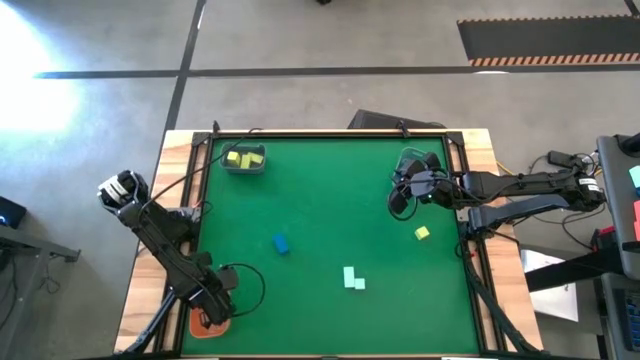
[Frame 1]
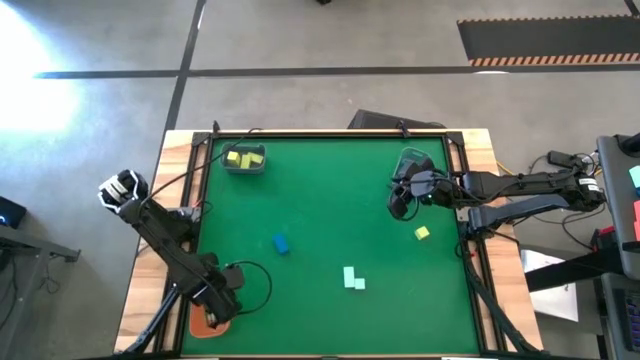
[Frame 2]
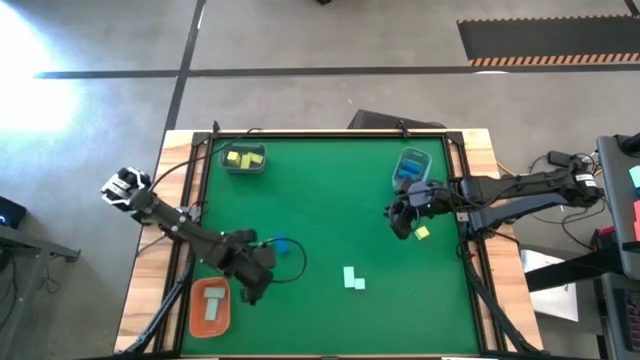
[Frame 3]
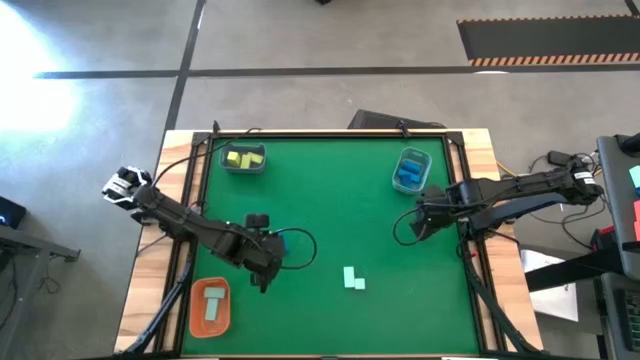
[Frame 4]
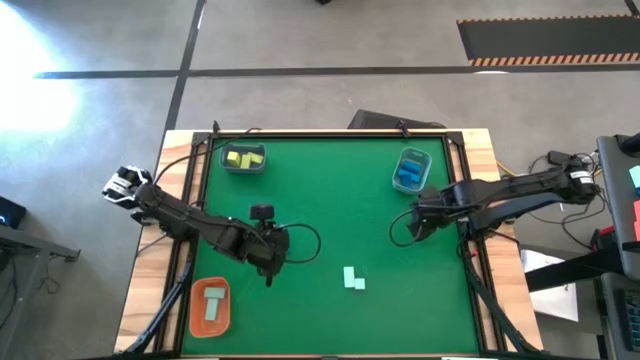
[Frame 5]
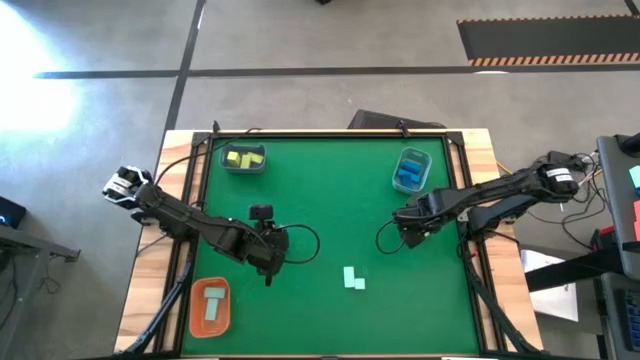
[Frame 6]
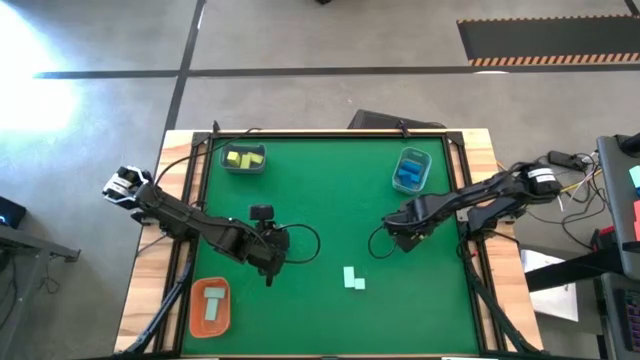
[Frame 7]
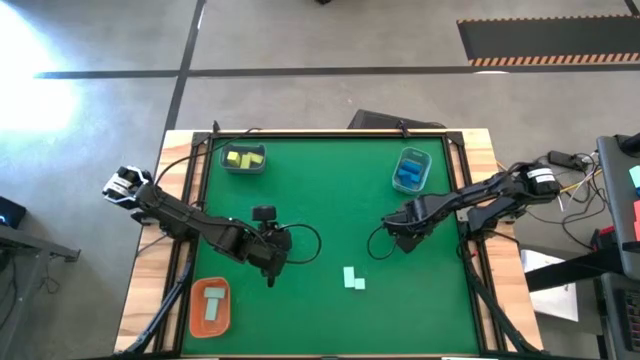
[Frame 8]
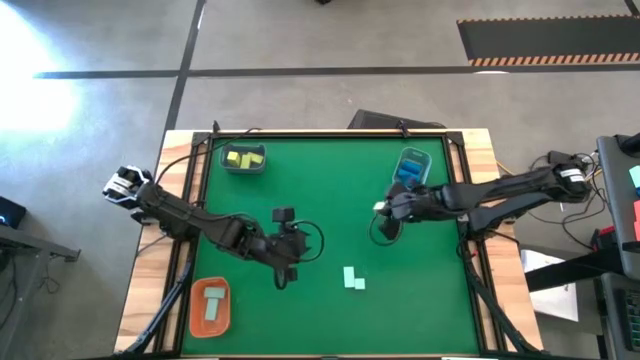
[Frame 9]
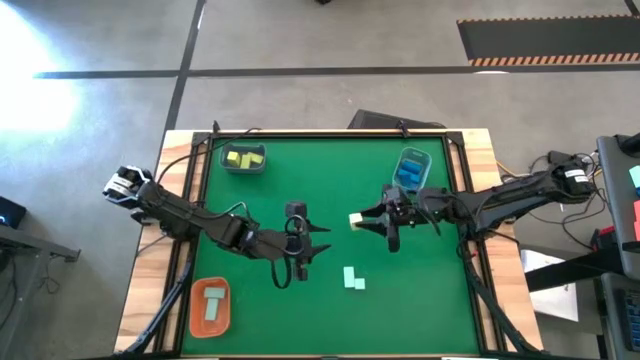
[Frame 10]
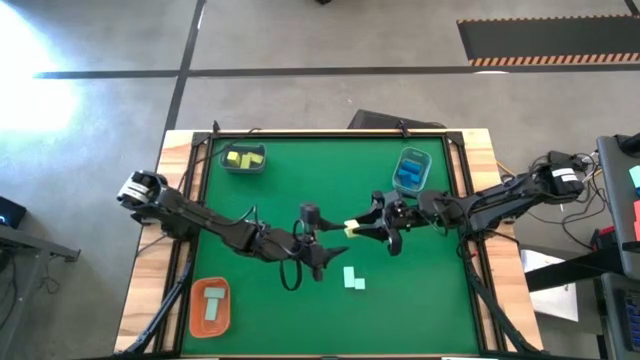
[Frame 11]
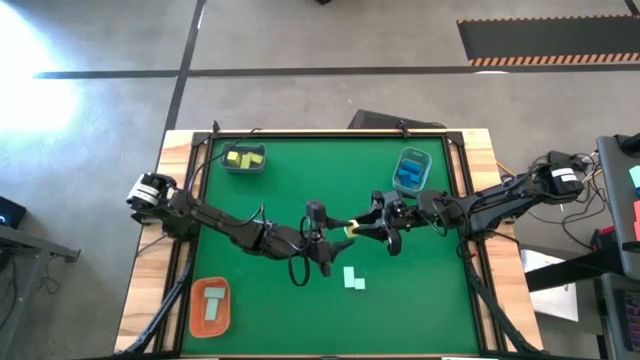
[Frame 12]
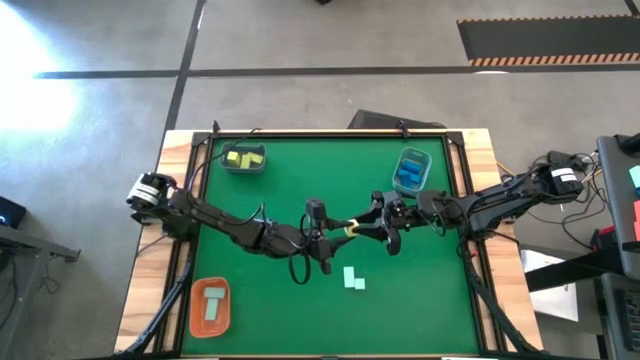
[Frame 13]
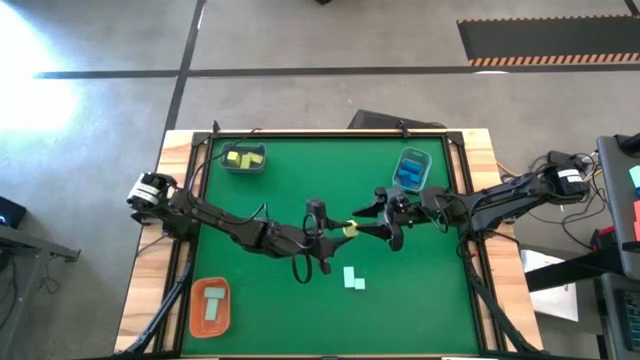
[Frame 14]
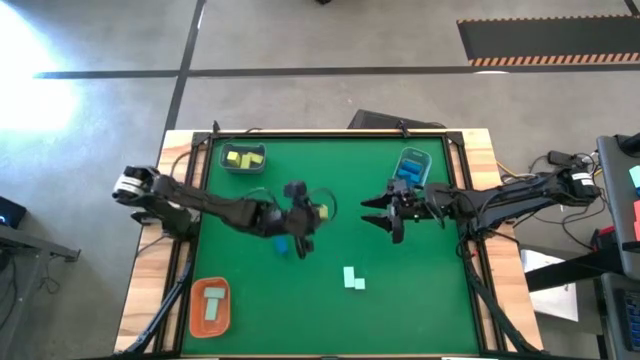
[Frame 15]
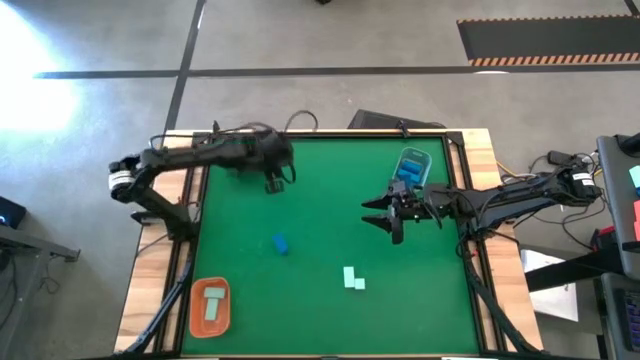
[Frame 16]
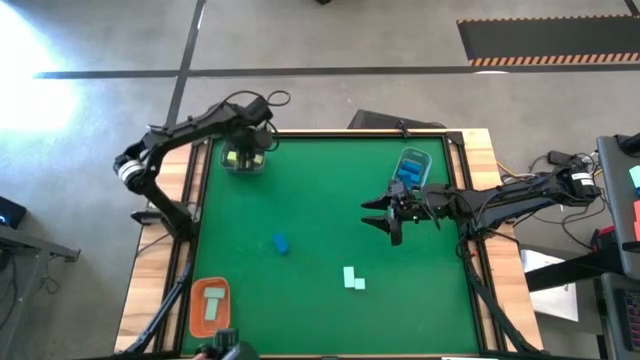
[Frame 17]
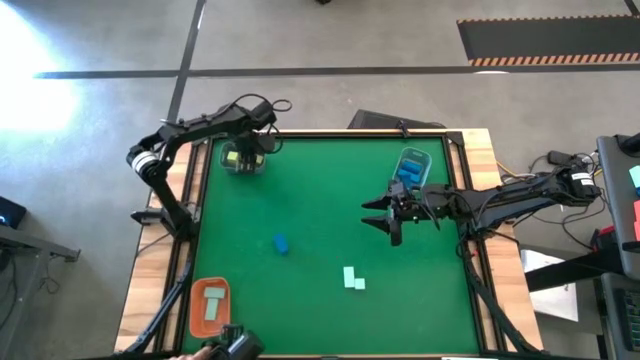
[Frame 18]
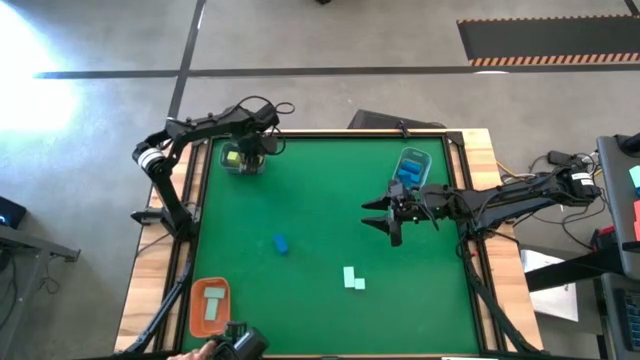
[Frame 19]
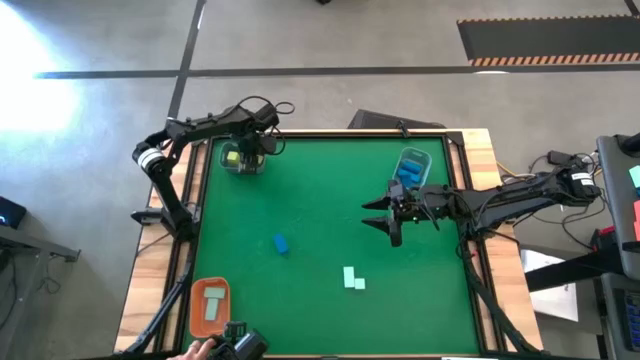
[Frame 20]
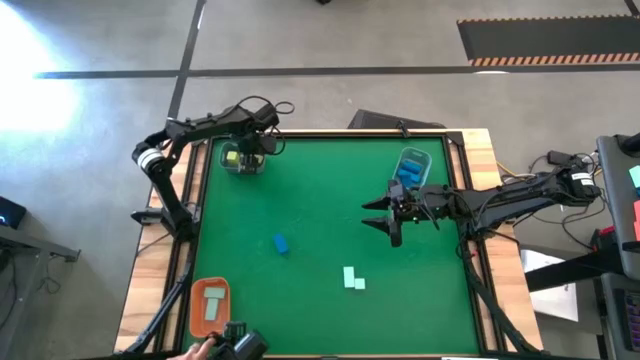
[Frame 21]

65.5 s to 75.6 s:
Task: Sort & place blocks by color
Put the yellow block into the blue bin

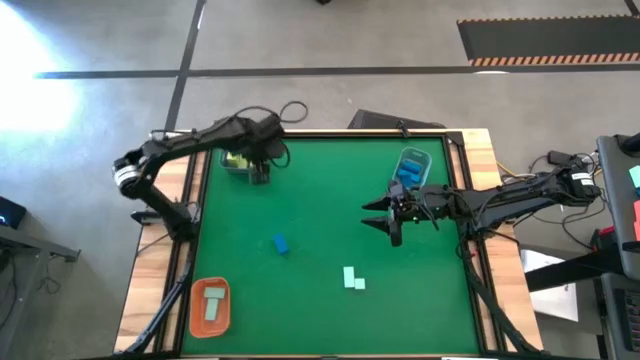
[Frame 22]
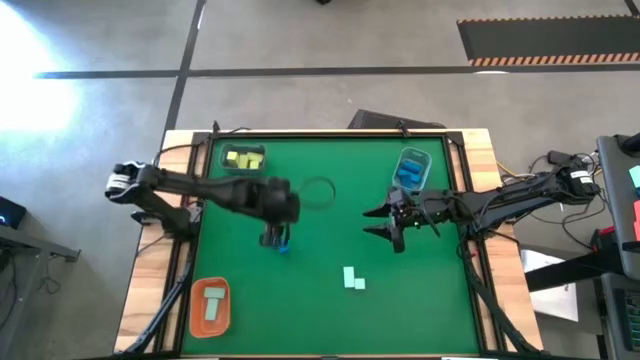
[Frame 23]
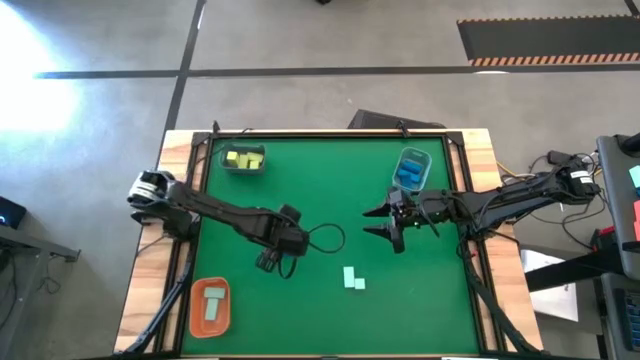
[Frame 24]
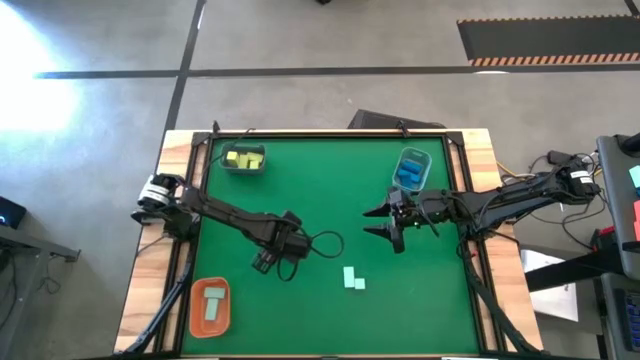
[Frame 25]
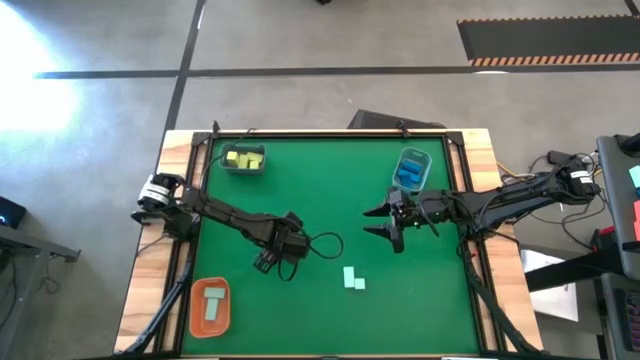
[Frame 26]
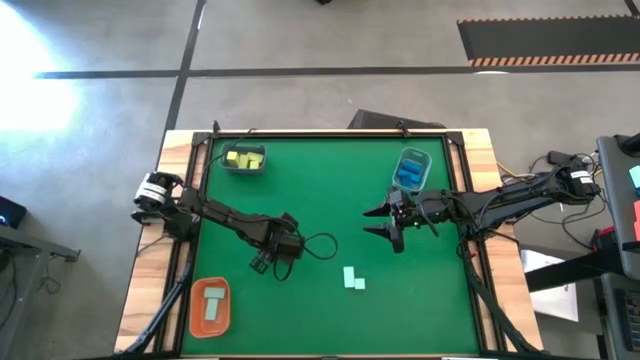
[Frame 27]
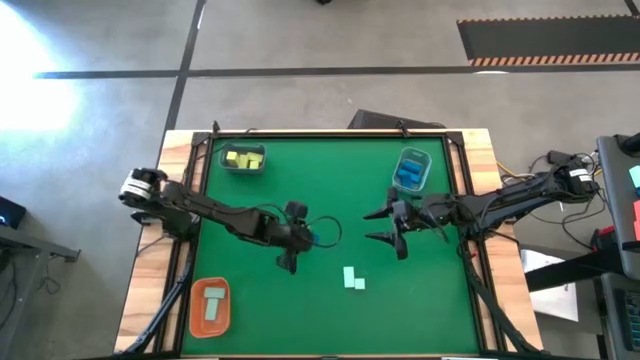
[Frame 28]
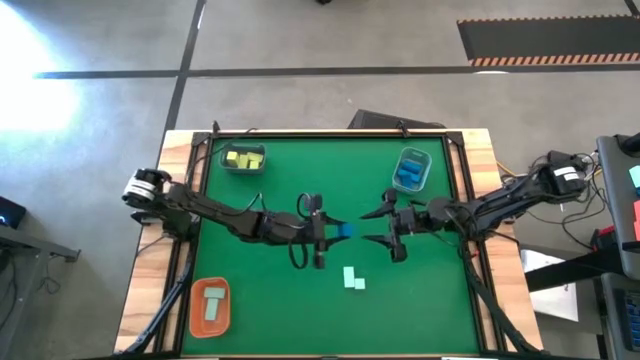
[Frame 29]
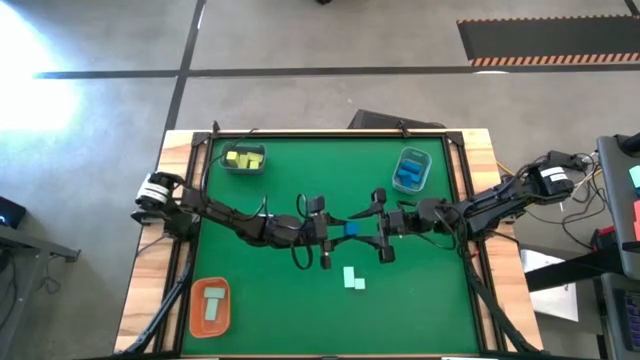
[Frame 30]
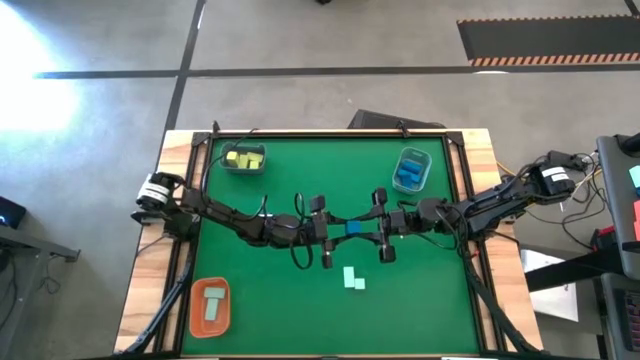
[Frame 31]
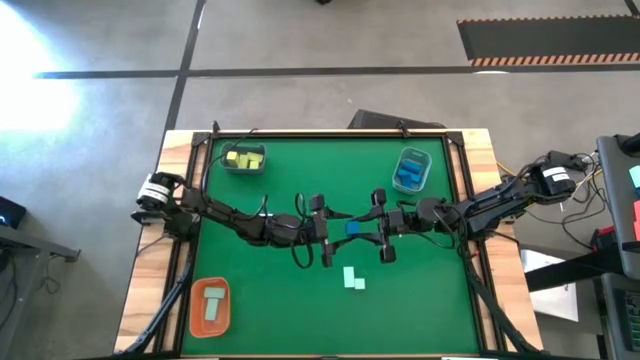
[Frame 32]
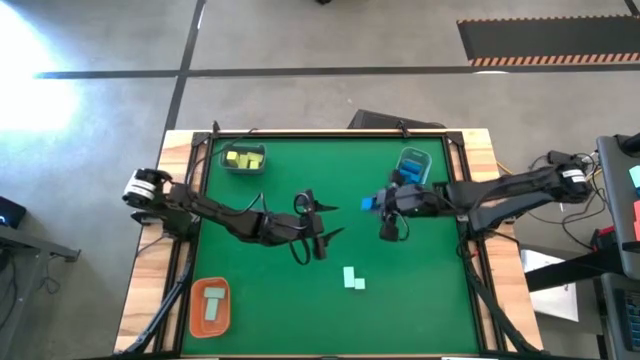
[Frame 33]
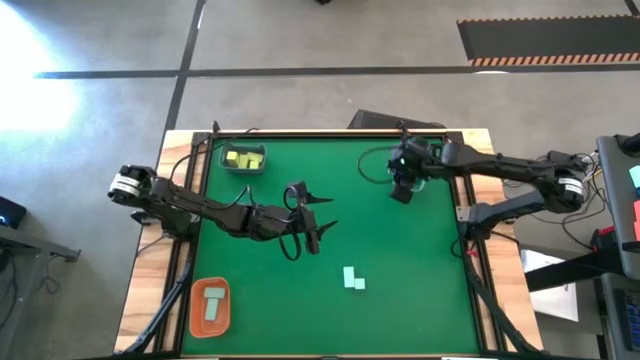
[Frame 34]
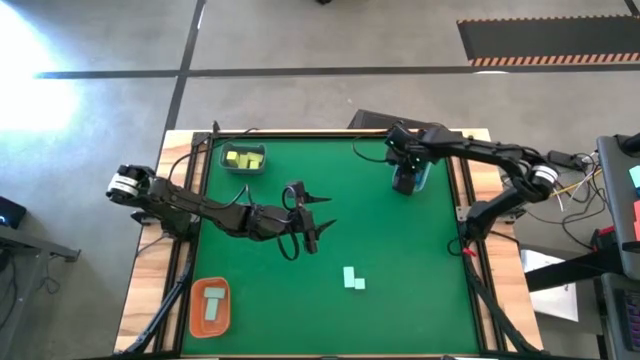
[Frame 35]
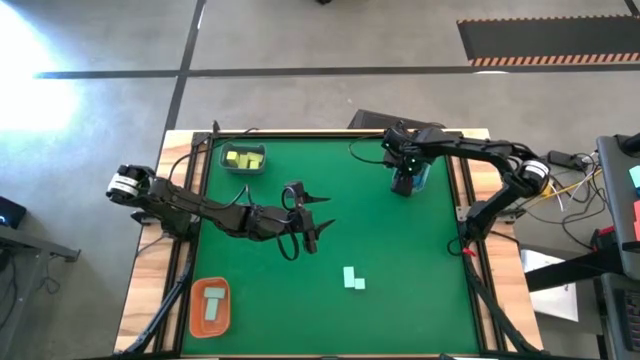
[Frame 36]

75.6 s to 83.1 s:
Put the blue block into the light blue bin

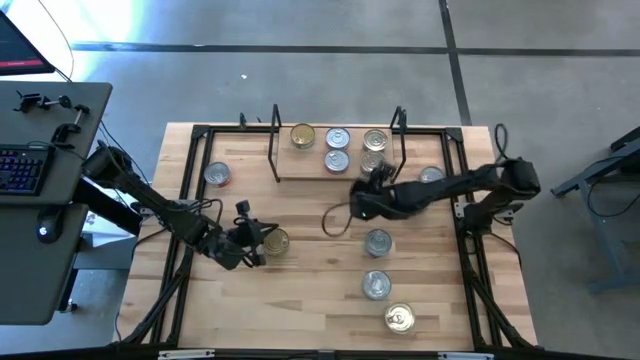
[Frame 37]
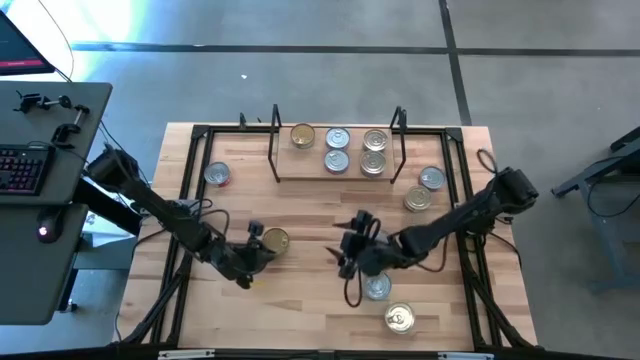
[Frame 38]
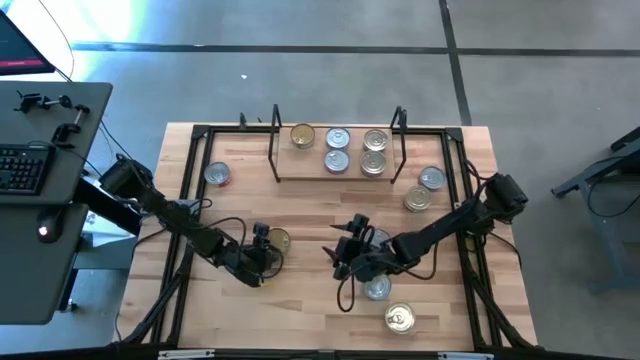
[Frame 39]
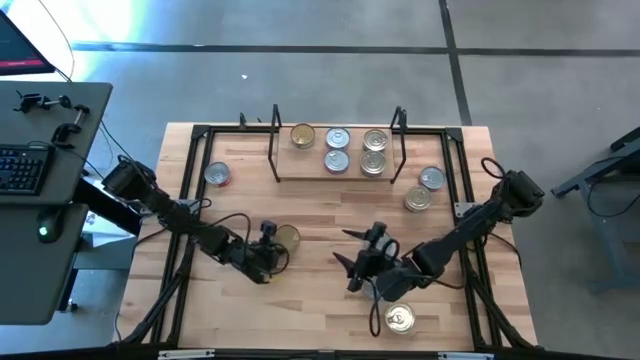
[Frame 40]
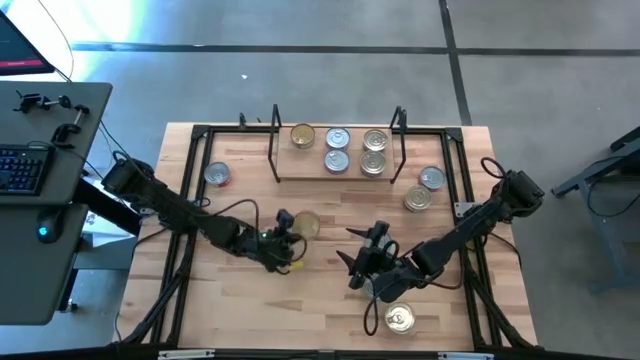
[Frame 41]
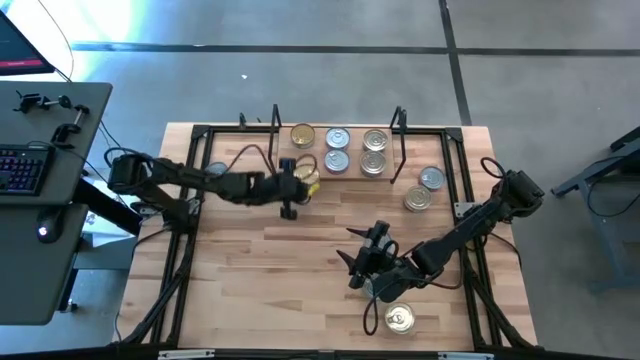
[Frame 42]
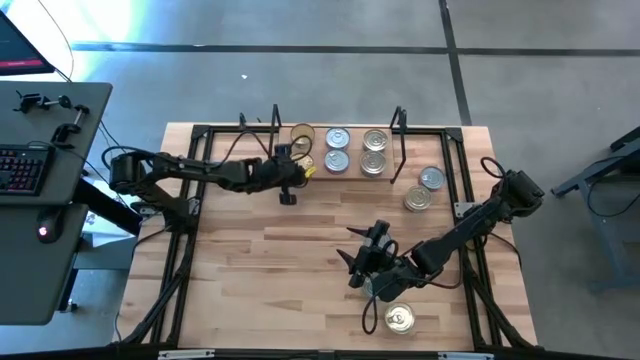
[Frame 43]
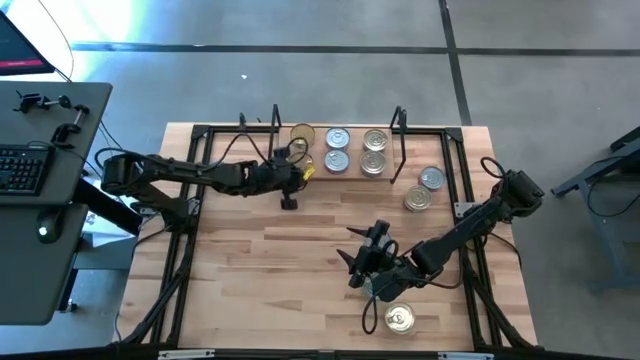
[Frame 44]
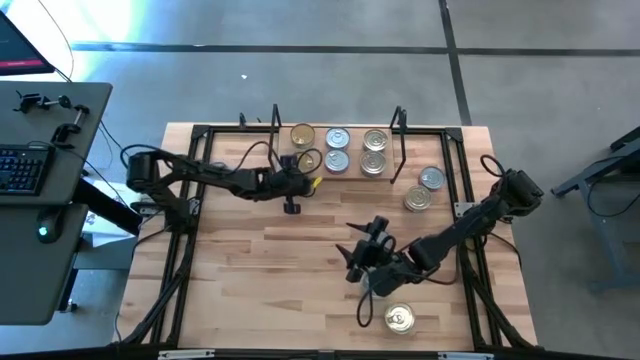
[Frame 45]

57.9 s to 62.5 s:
Task: Stack canned seafood by type on shelf
Put the green tuna can and align with the other green tuna can on the shelf
